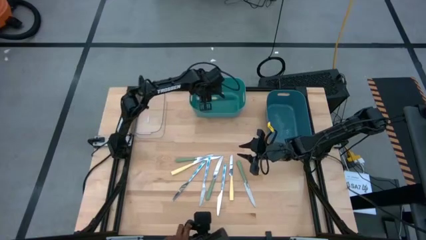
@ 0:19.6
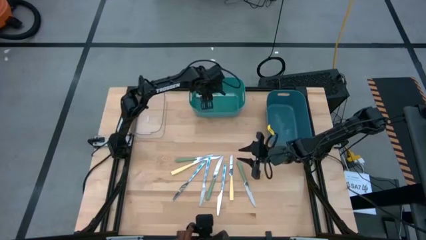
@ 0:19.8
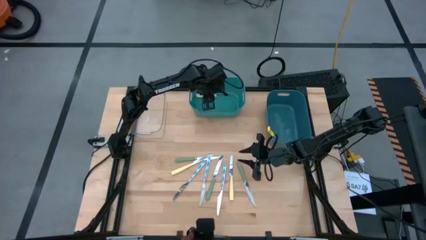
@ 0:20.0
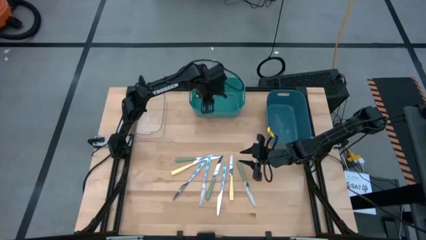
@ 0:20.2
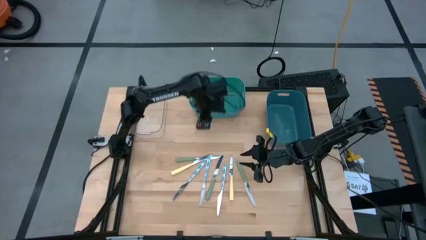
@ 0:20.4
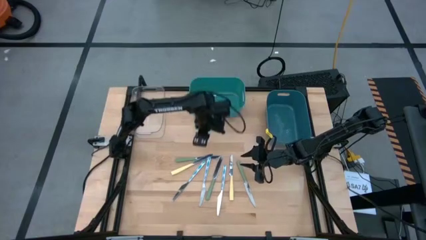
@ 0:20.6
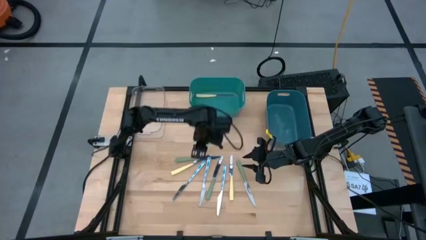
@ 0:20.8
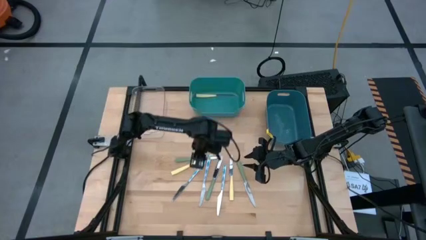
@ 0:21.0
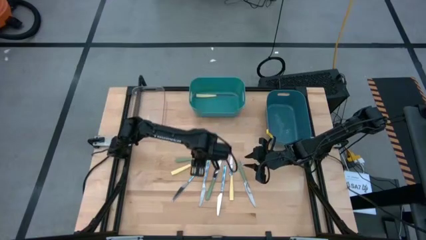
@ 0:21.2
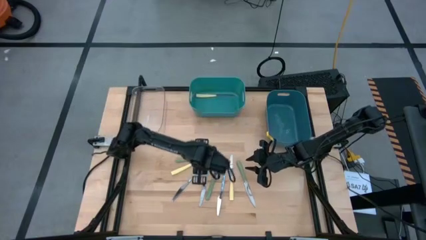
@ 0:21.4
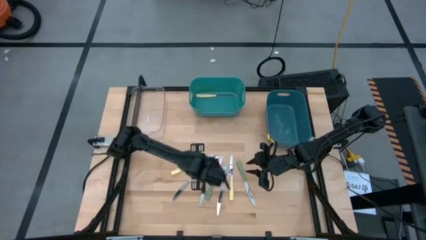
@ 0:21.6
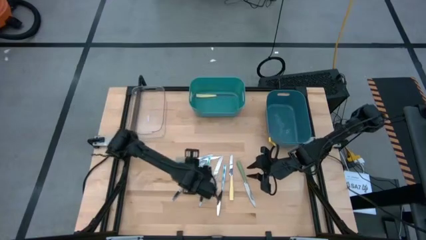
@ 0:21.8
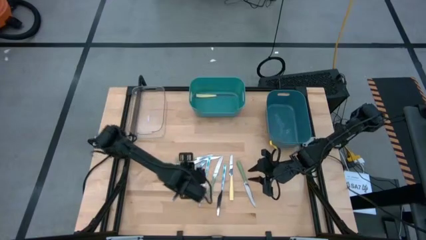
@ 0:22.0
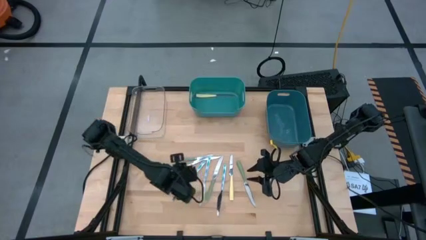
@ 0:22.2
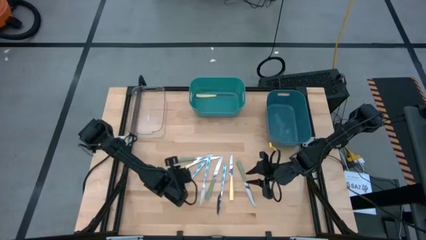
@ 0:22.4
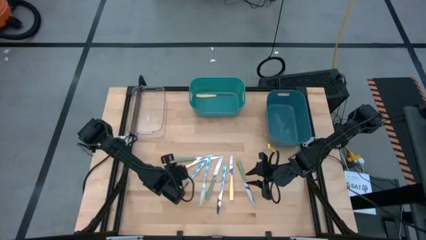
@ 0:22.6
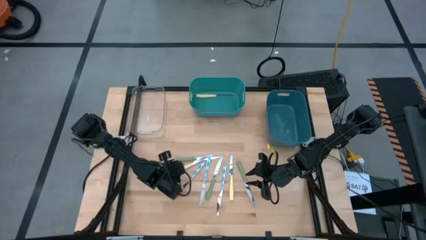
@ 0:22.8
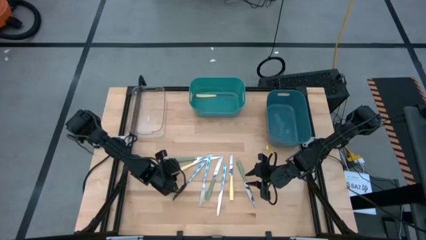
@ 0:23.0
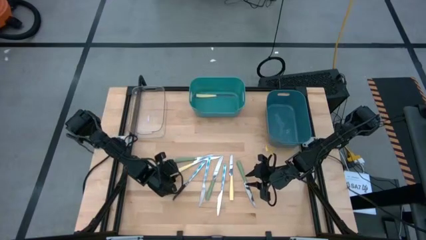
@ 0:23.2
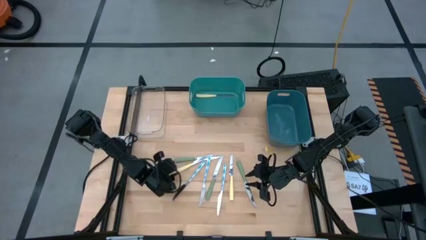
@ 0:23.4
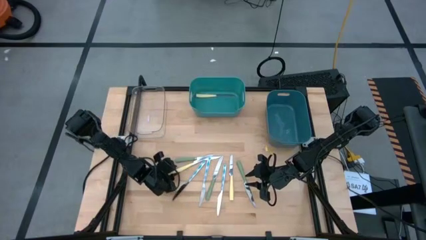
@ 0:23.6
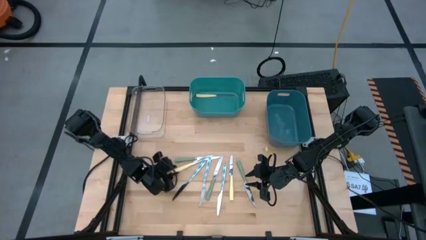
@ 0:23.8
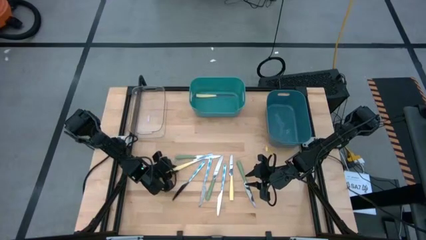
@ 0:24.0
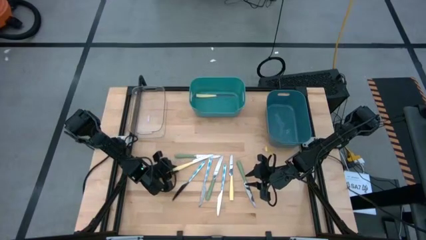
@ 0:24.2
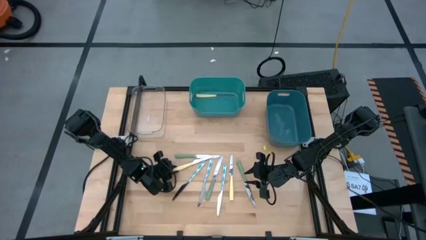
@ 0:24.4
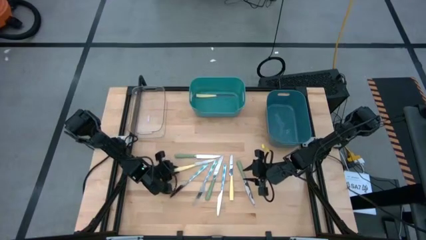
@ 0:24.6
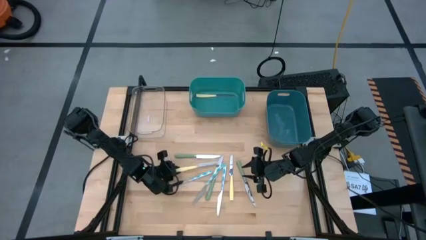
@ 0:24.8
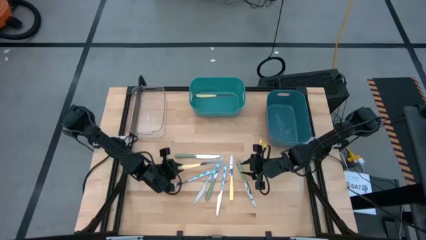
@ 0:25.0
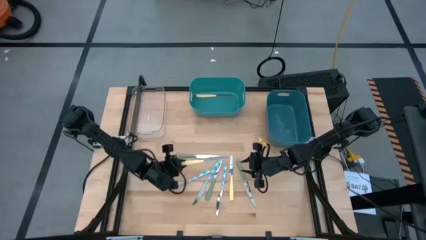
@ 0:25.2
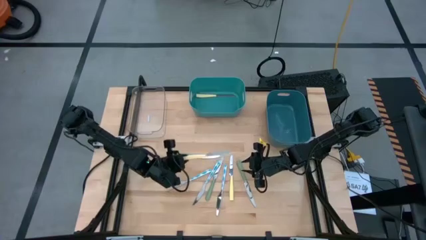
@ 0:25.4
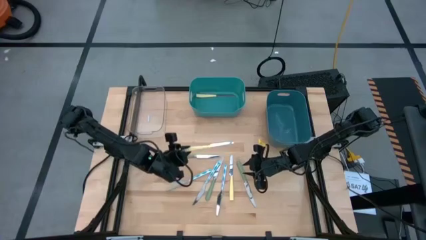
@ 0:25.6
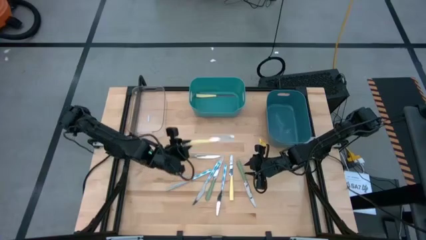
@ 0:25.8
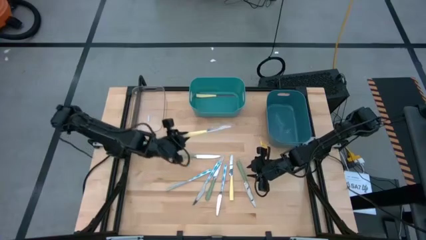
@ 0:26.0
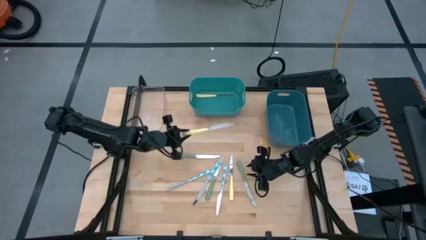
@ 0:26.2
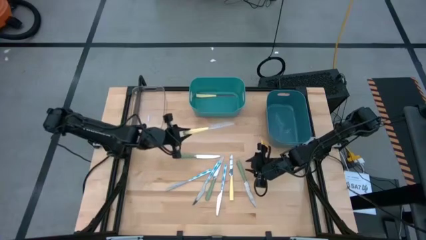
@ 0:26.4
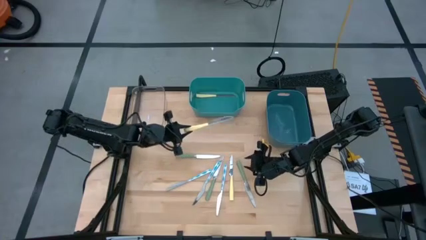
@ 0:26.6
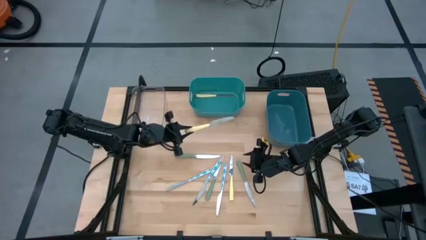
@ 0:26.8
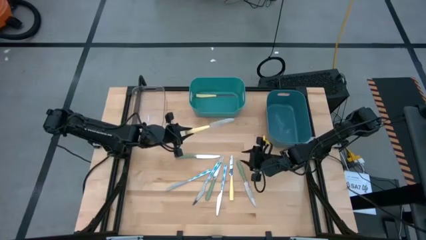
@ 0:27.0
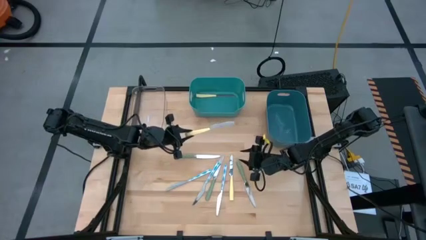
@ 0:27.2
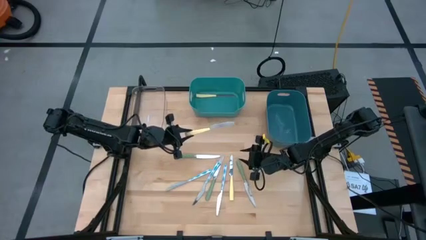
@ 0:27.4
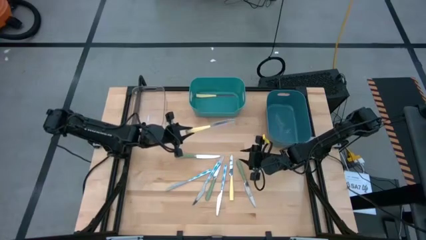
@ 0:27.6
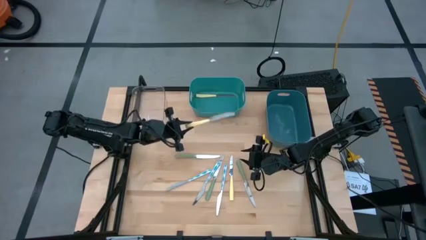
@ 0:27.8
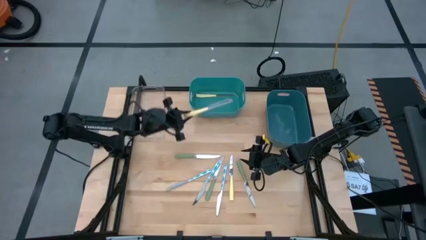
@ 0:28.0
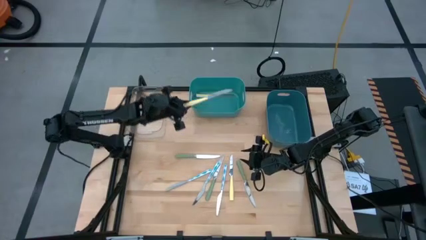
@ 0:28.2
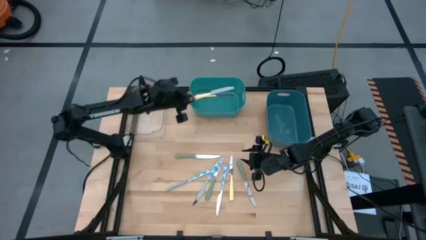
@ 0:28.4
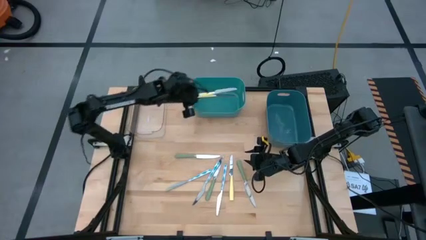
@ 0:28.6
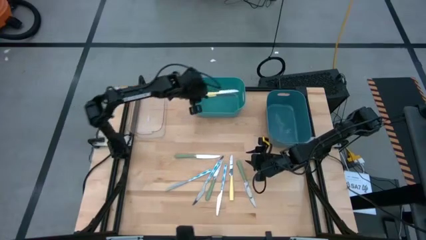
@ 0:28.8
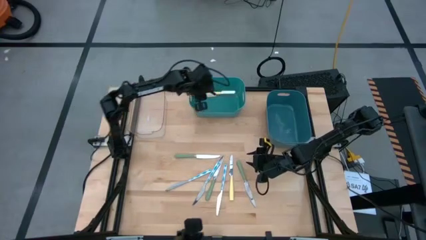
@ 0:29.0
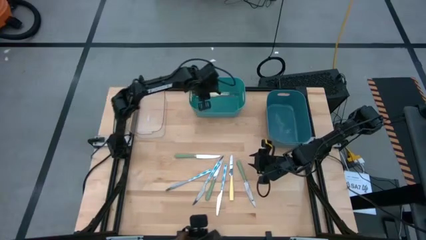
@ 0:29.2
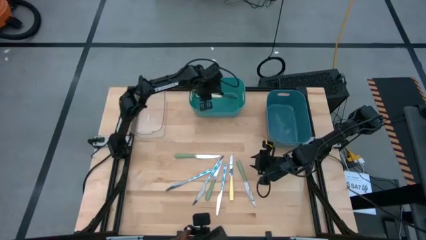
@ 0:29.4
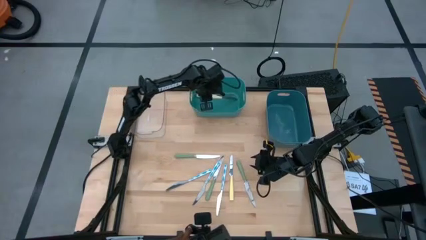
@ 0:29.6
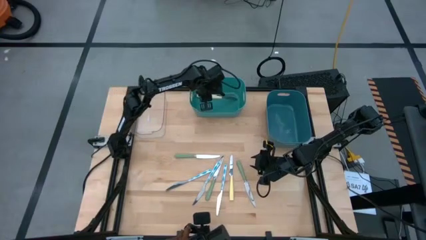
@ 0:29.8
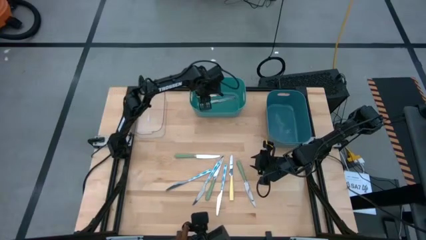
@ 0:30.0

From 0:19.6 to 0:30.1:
Task: Sort silverware by color (type)
Put the left yellow knife into the green bin
